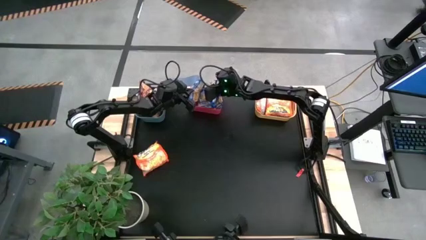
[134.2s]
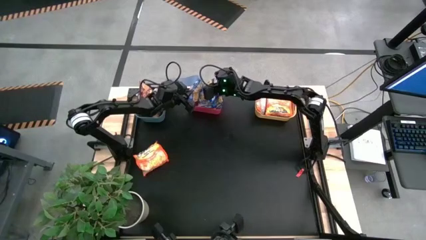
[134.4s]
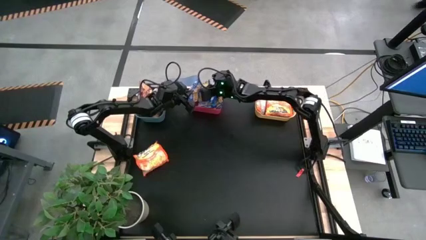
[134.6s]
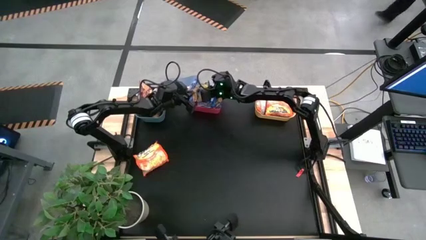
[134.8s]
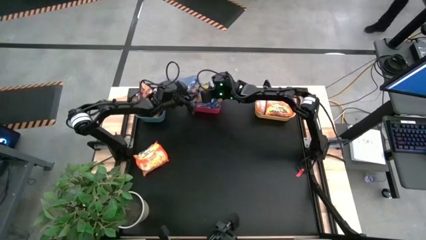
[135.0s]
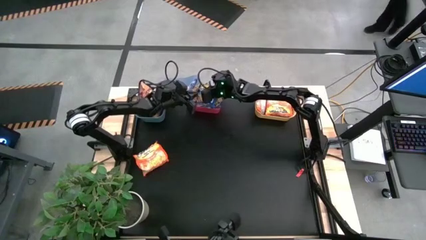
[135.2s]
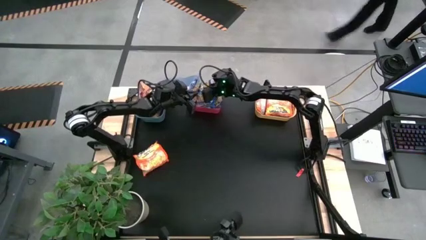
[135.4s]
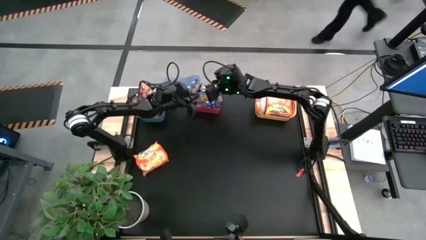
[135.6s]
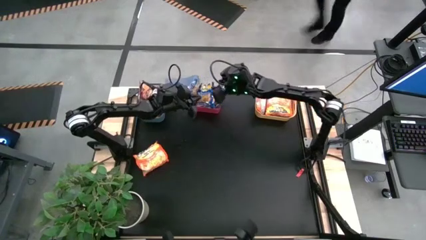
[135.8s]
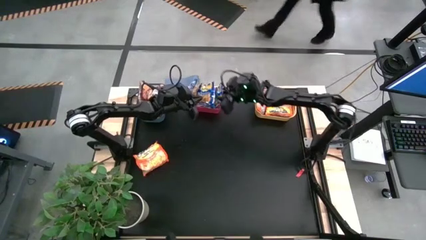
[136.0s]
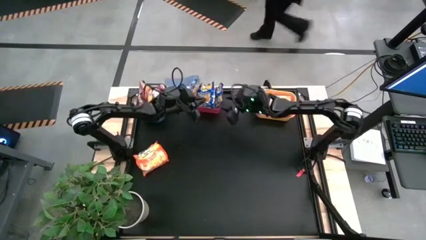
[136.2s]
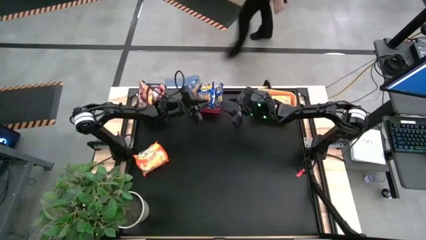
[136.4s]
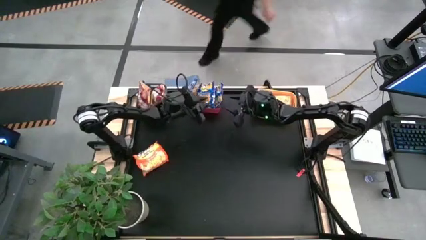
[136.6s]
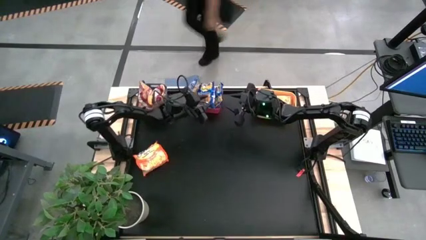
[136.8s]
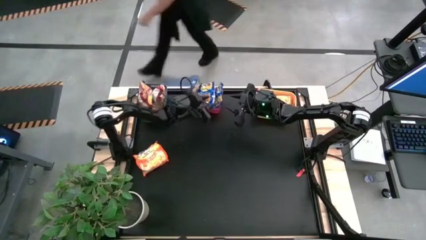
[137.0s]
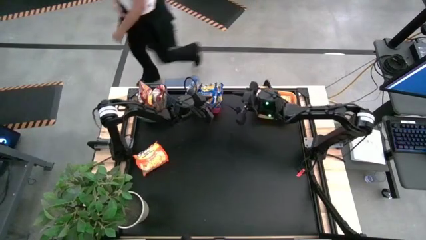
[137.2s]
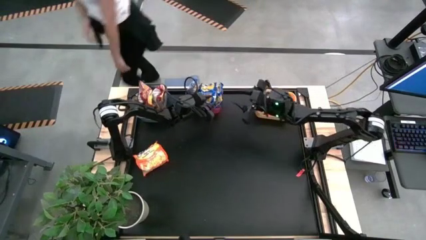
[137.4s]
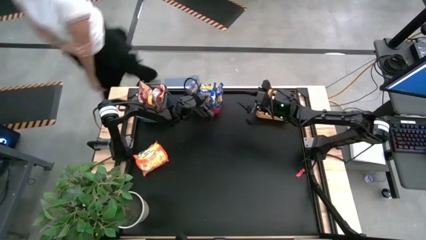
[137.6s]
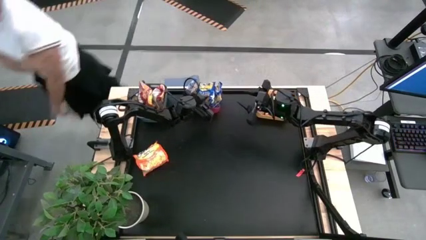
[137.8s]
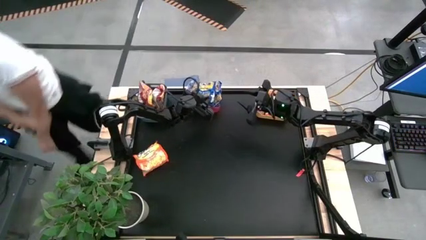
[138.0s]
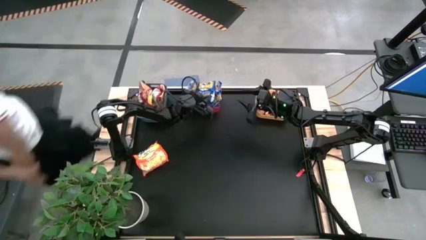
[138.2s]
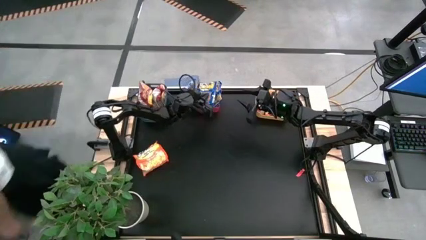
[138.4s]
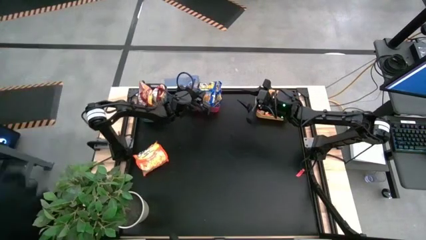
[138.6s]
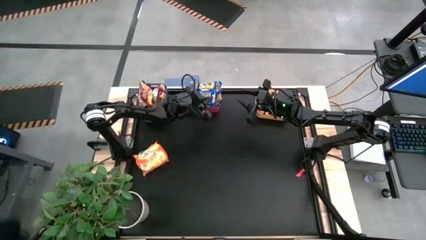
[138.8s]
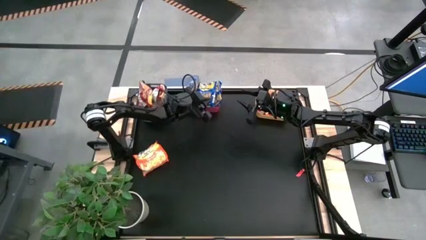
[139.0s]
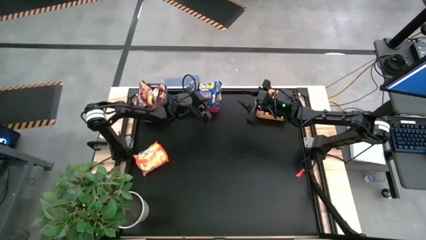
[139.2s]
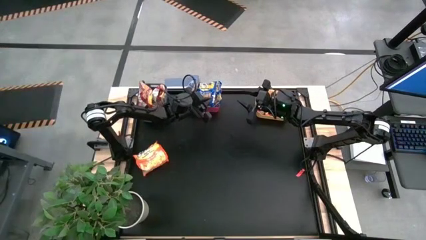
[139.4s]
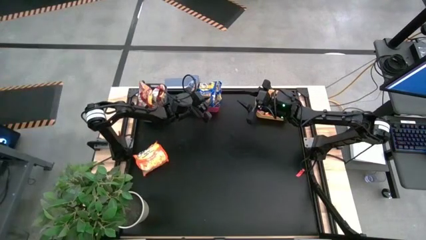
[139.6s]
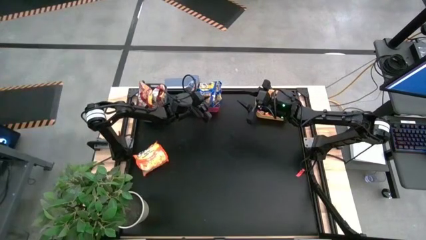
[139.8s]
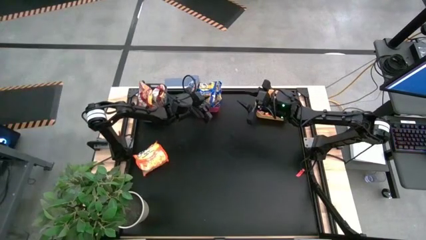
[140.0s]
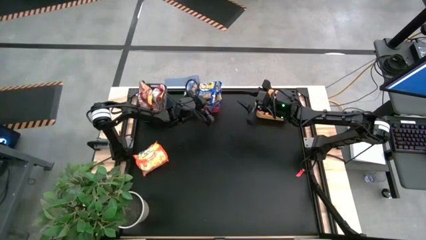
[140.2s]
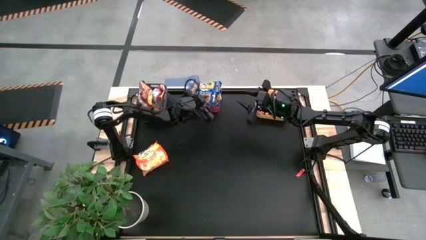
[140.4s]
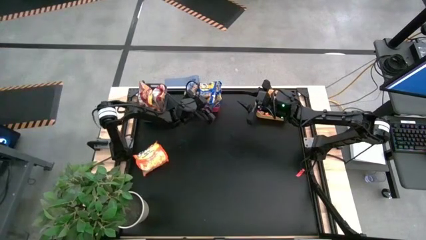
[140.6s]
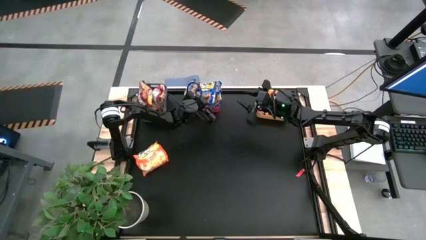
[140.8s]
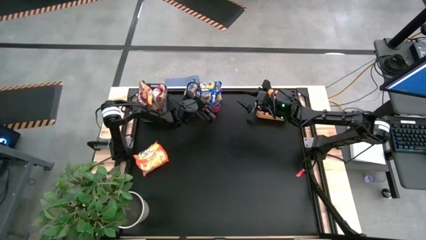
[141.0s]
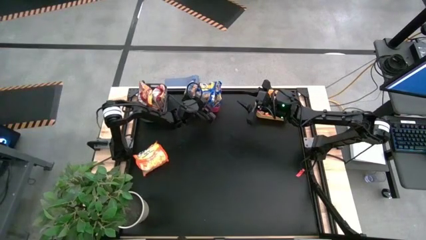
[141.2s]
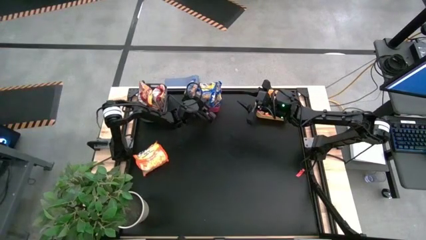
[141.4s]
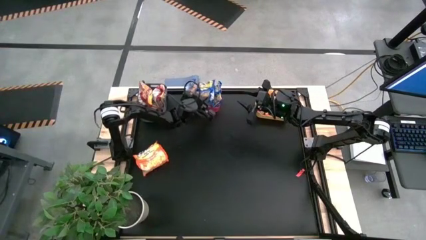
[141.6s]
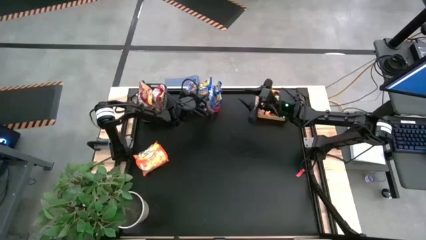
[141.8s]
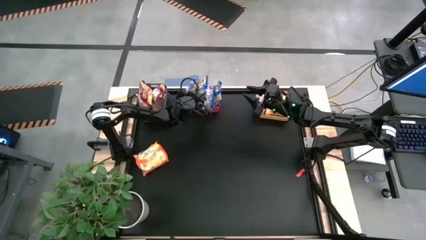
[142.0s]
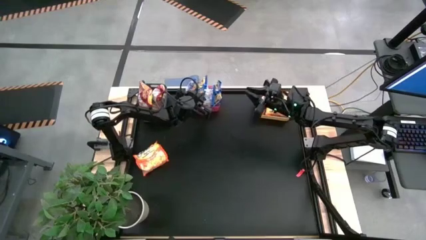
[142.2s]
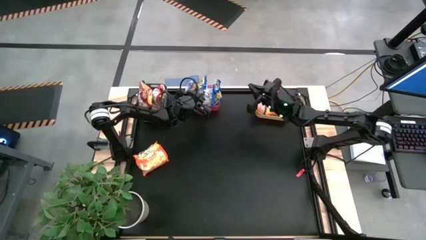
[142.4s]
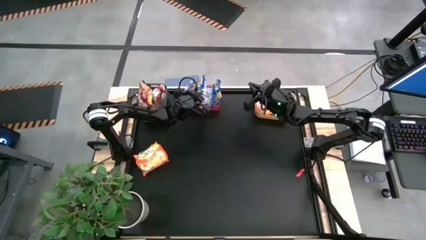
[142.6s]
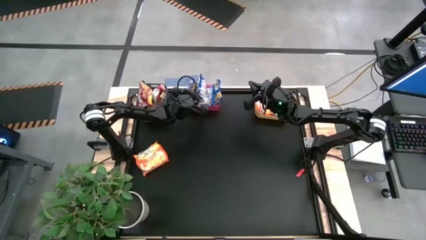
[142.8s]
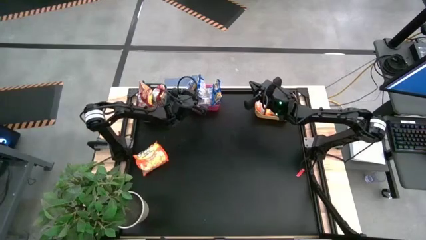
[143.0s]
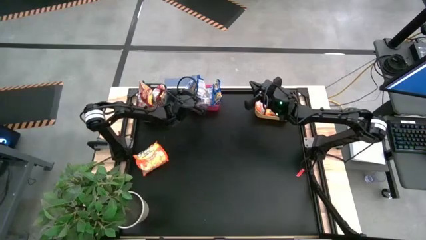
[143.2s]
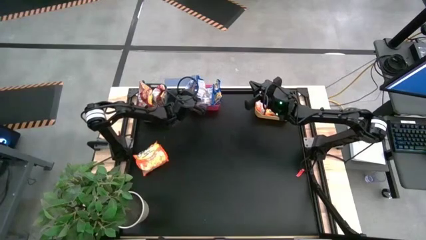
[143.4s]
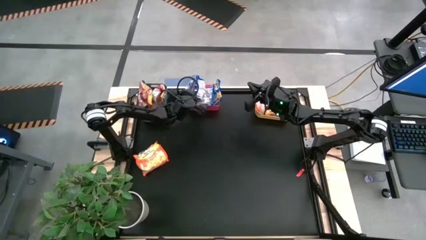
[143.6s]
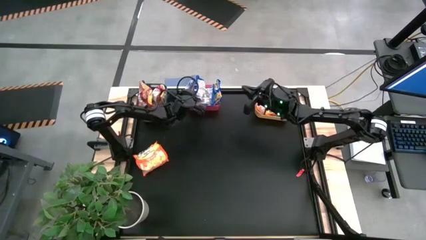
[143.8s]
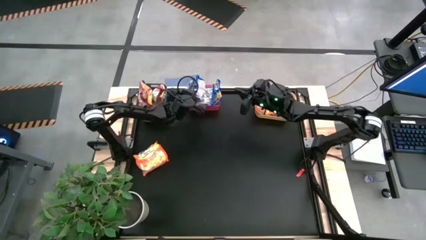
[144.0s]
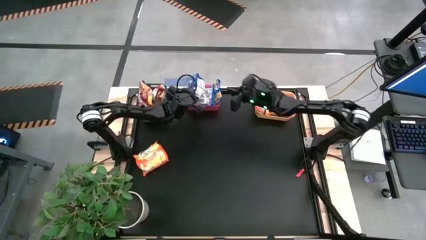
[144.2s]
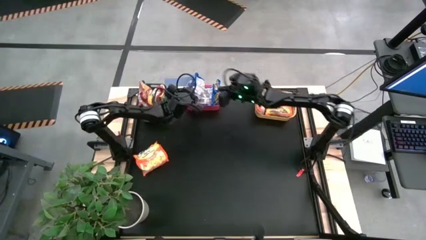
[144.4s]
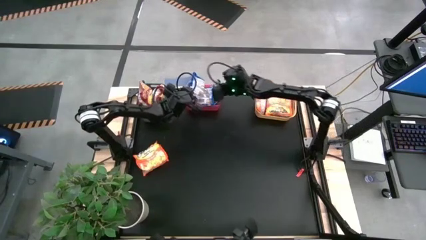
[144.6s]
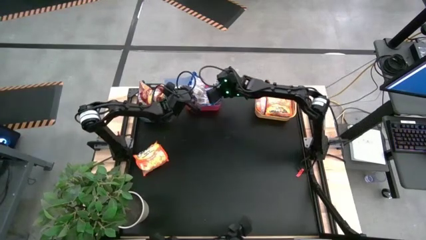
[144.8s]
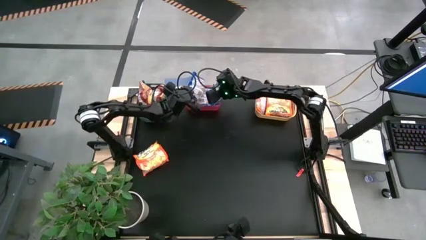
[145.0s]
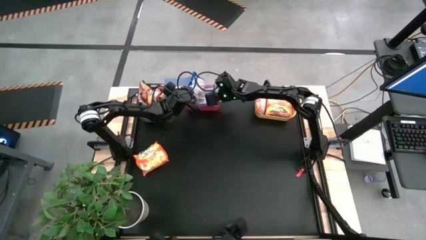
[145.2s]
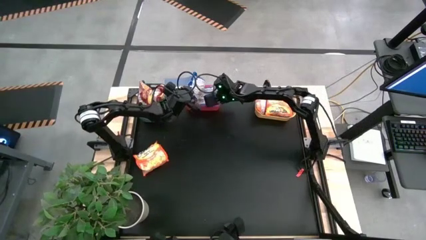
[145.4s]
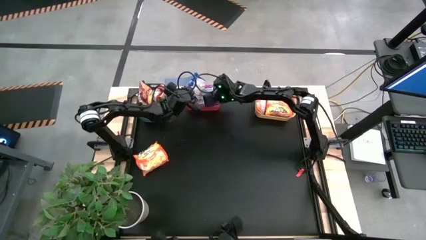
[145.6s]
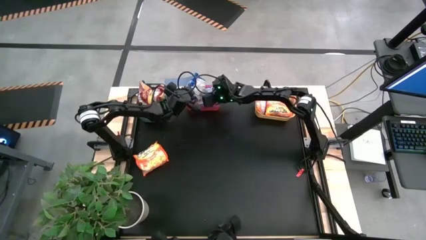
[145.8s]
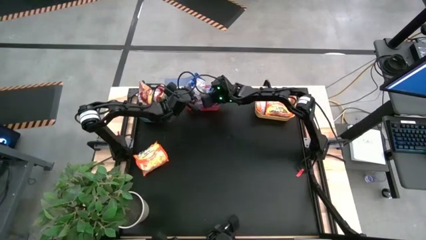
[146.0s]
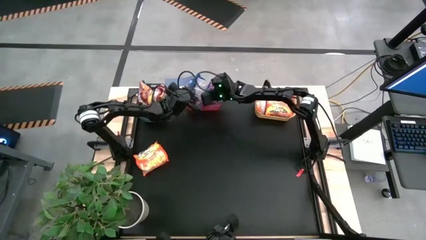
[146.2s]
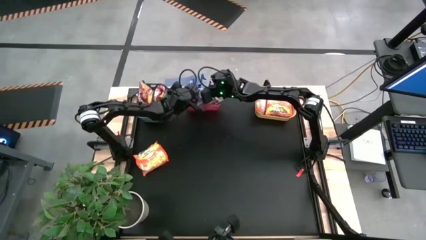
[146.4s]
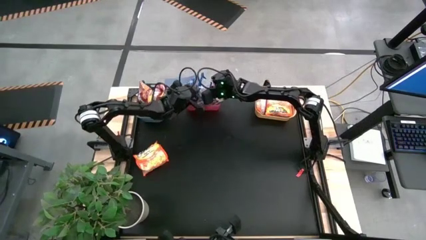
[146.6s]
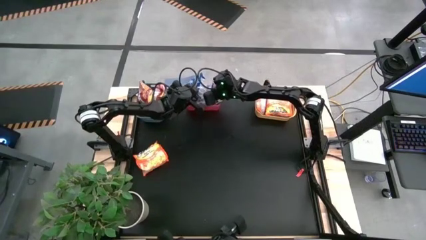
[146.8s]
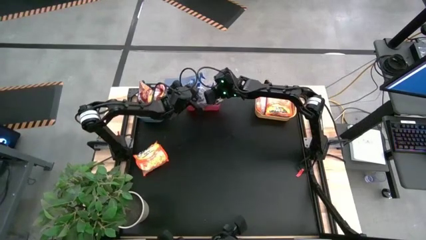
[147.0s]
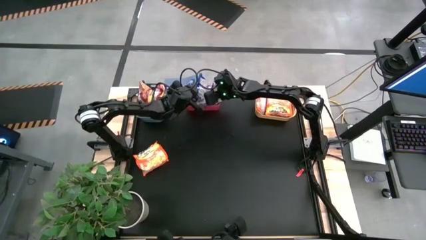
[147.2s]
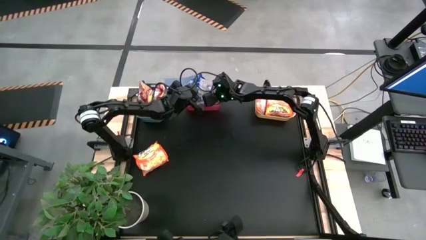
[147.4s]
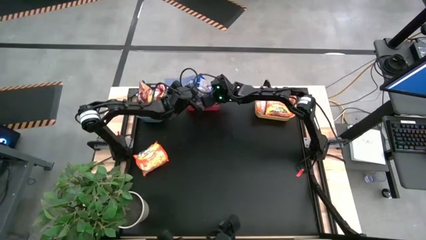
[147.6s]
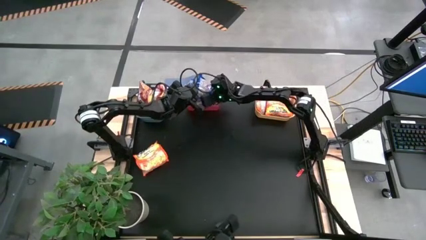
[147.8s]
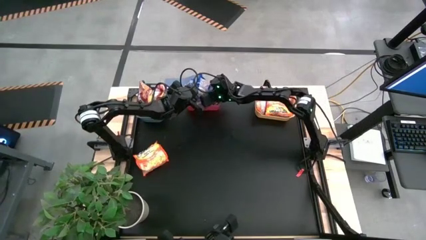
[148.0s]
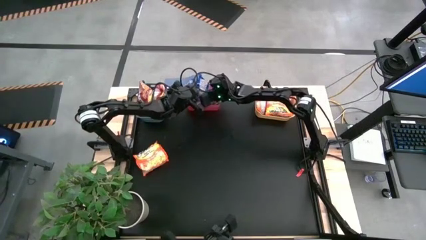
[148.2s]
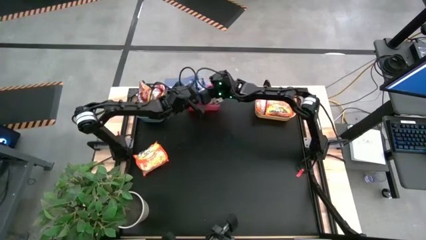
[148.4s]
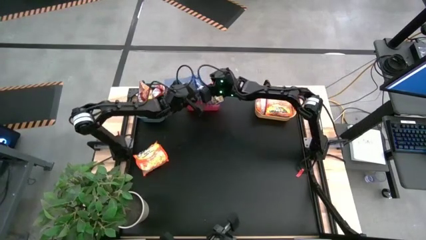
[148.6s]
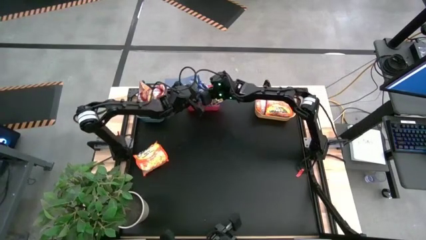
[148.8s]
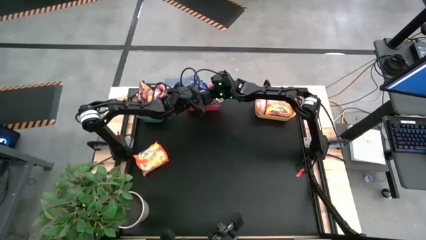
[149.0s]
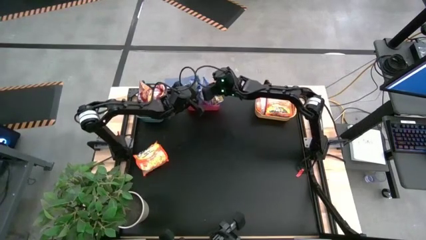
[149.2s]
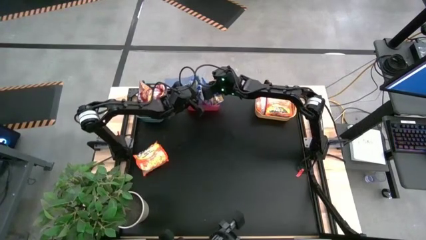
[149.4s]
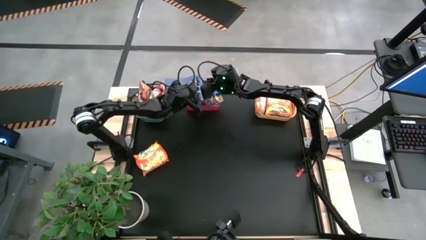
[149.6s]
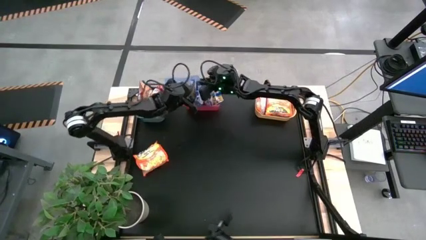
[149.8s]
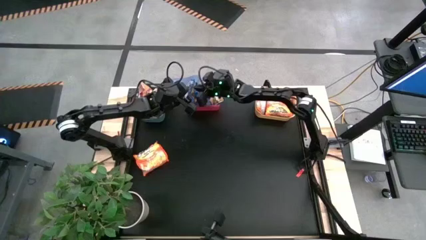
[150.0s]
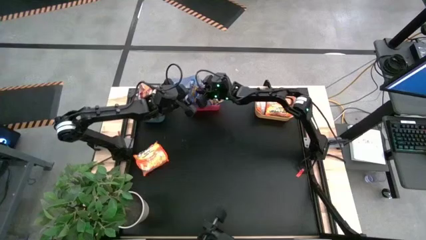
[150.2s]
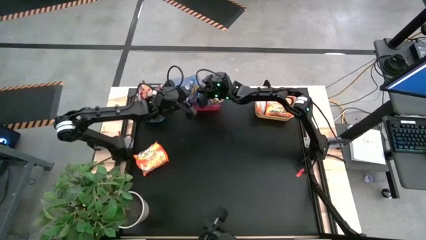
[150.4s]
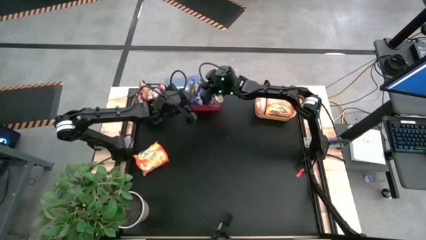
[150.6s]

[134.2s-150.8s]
Task: Sort Maruchan noodles
Put the blue noodle pack into the pink bin
